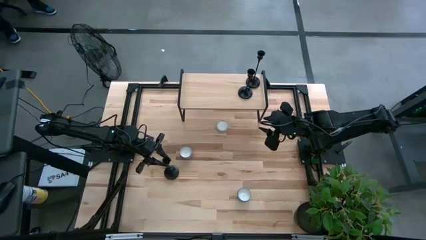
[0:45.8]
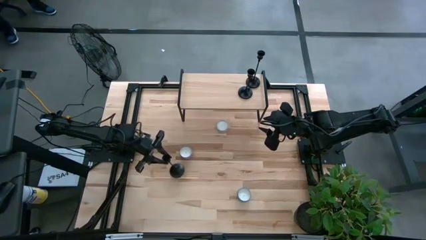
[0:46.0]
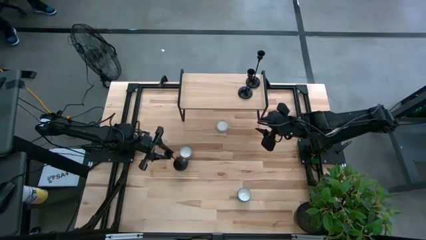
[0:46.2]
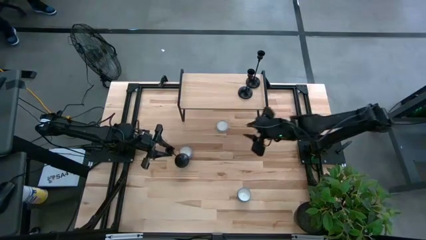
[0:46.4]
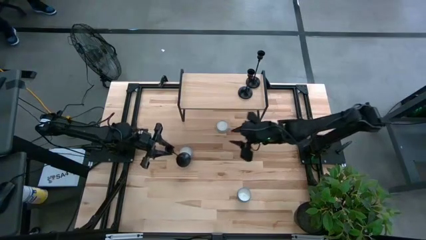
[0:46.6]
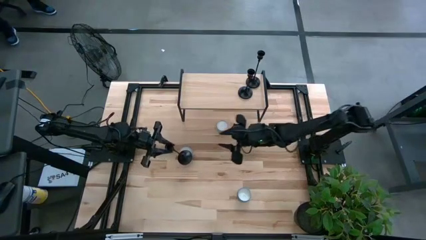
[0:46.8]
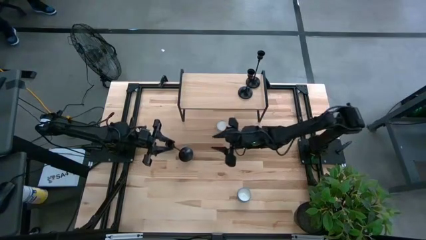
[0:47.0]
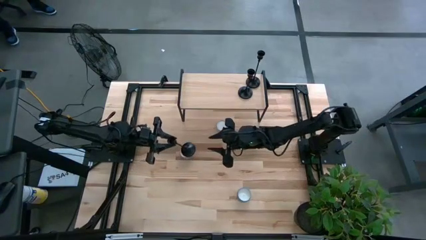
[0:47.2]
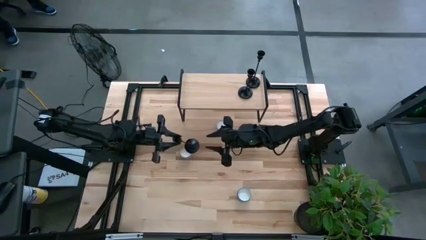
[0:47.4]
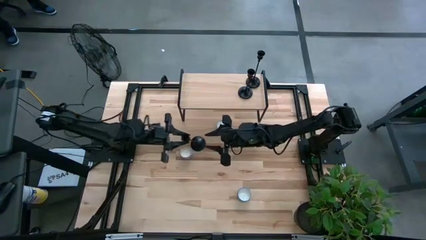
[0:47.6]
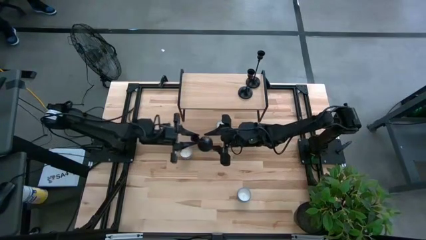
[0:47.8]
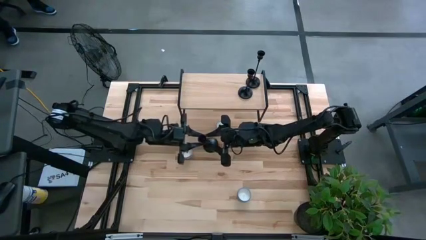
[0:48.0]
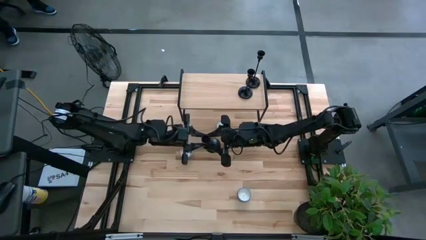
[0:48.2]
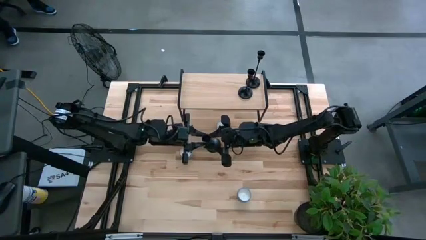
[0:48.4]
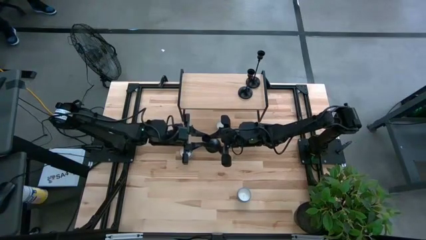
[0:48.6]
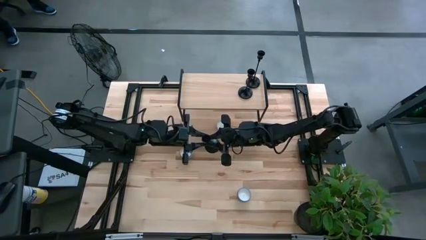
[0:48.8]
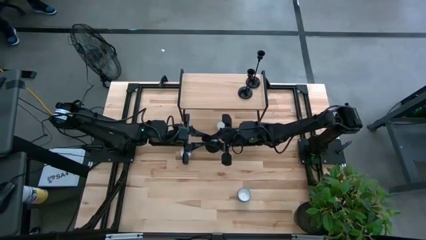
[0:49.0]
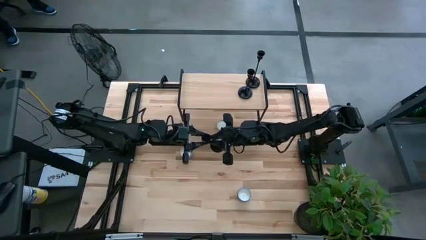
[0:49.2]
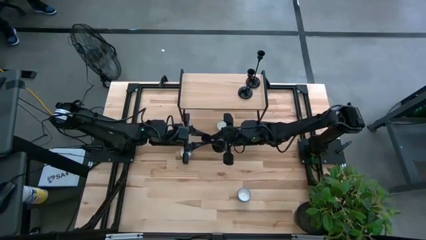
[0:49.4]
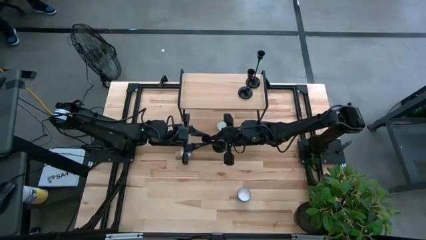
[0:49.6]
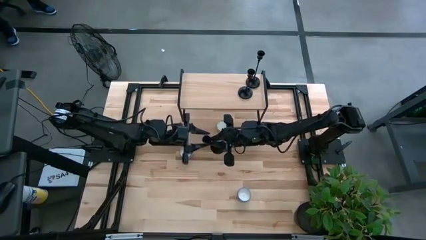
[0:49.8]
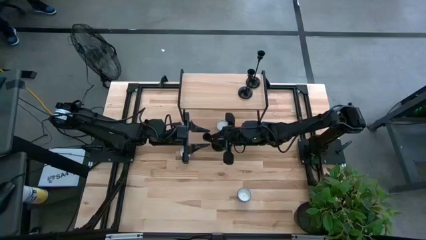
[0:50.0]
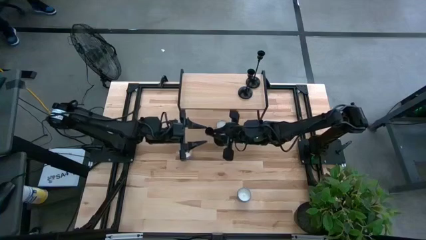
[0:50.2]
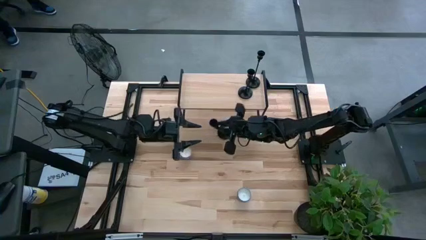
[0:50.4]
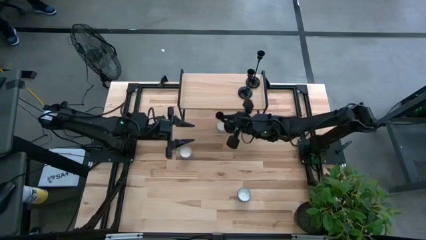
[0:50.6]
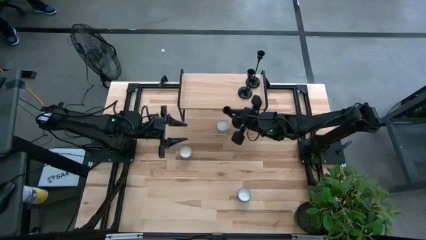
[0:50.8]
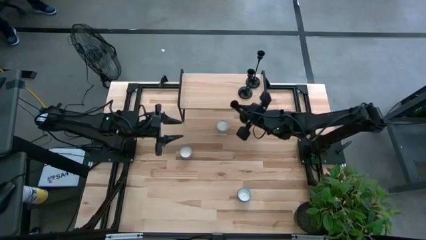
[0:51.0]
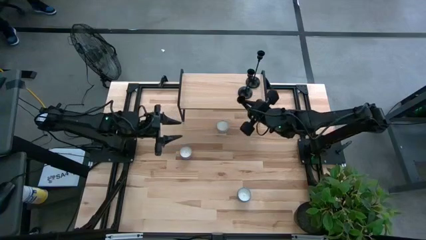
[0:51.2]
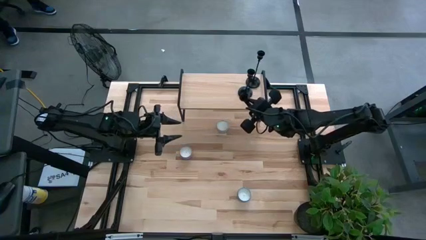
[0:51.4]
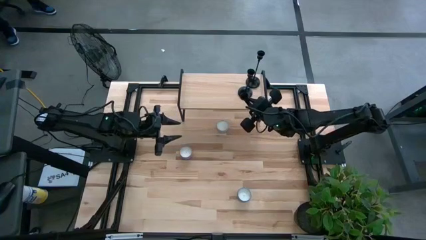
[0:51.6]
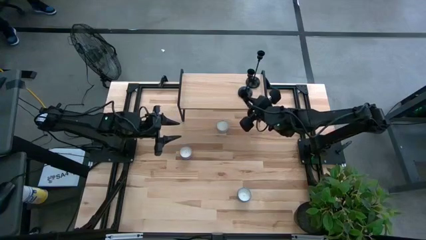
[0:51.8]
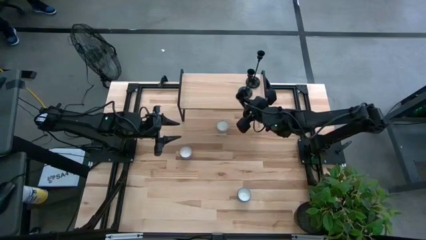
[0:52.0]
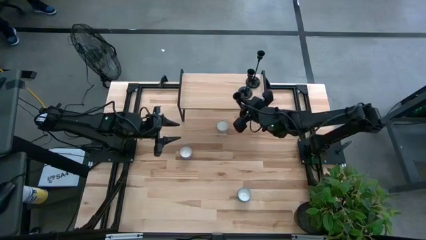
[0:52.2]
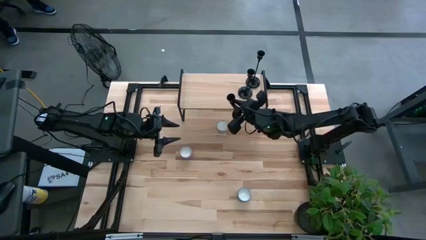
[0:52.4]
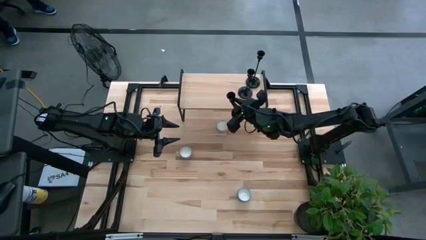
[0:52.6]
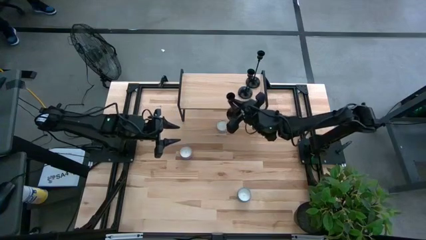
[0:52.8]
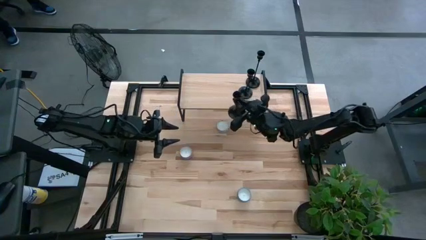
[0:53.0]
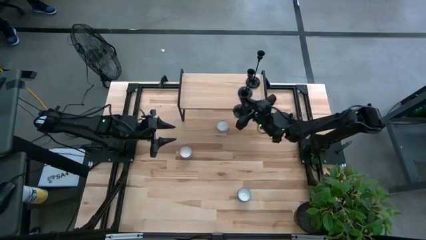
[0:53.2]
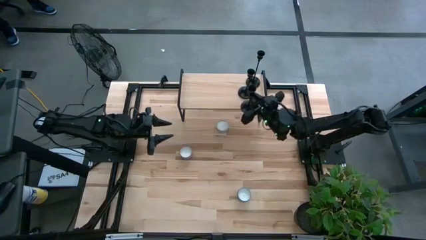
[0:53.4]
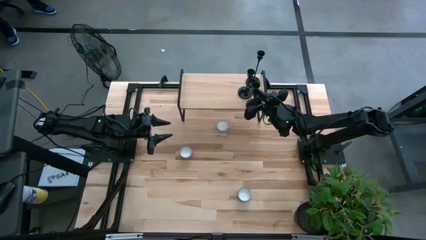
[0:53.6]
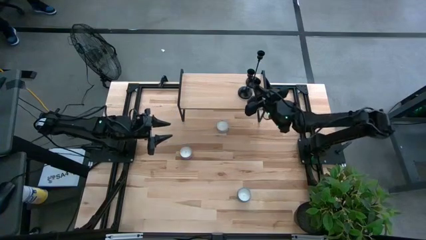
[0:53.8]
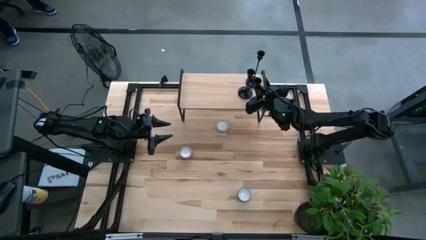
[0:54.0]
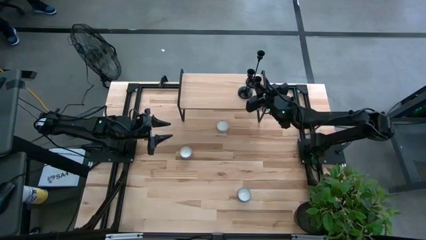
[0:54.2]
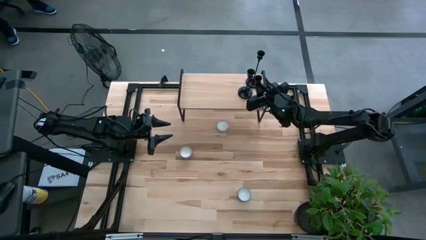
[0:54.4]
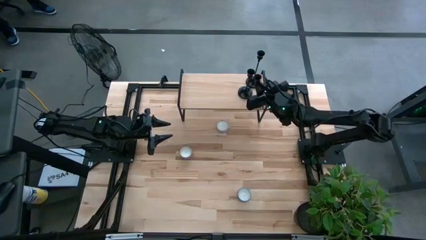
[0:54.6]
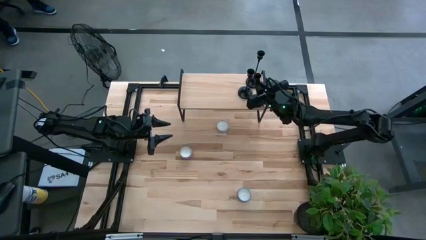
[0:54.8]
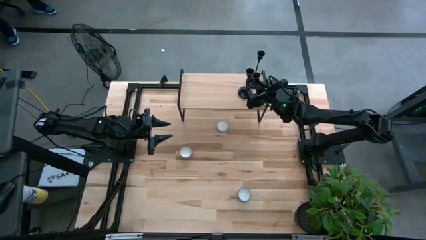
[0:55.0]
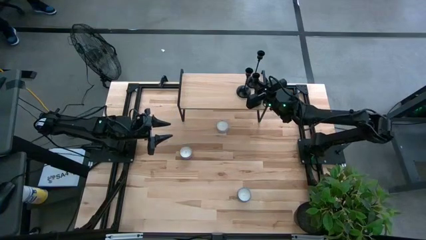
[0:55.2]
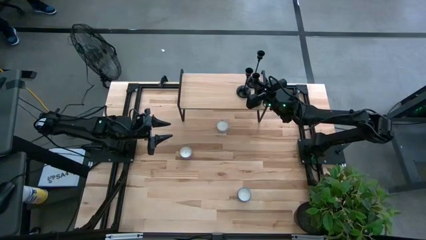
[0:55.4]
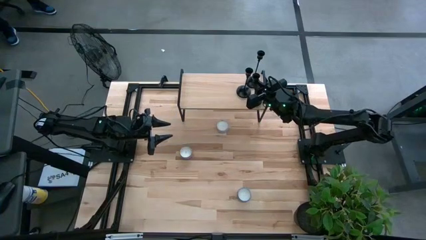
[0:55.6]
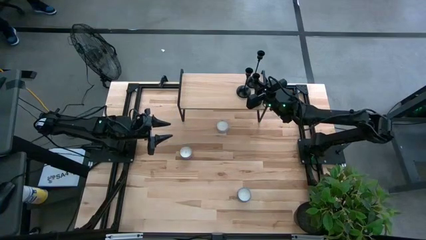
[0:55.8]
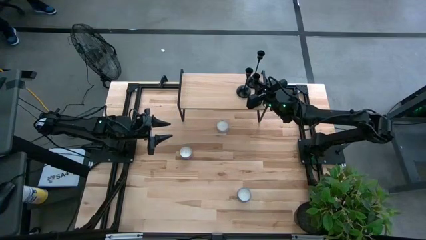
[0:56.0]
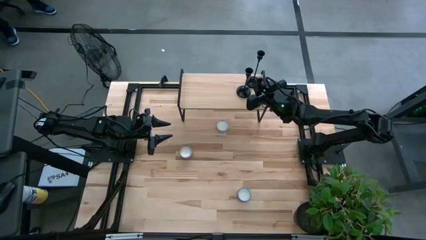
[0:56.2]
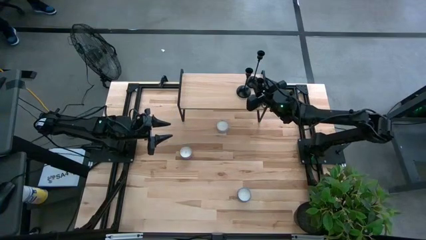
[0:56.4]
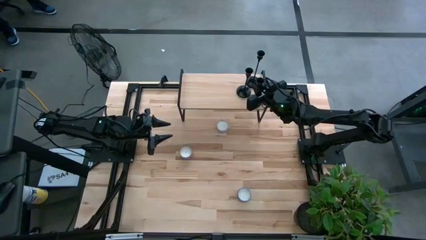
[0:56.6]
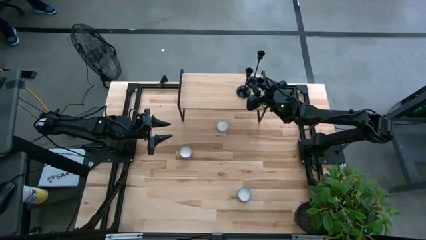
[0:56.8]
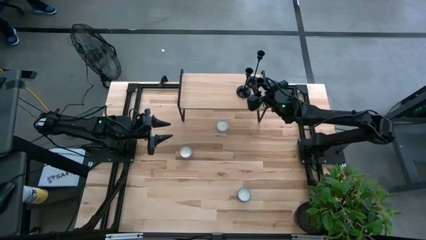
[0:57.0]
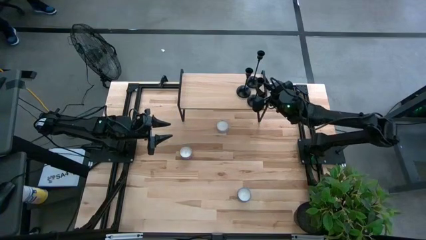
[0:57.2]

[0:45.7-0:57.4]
Task: Pick & Place candle stick holders
Put the black candle holder on the shelf
